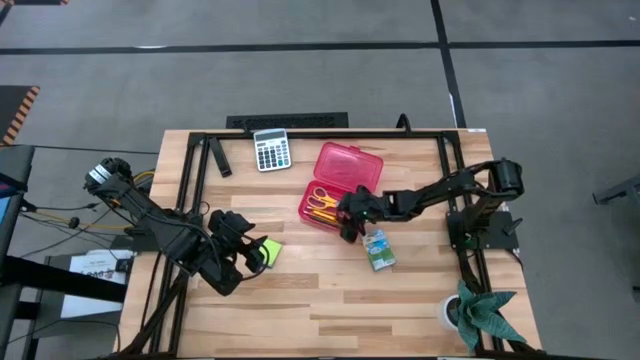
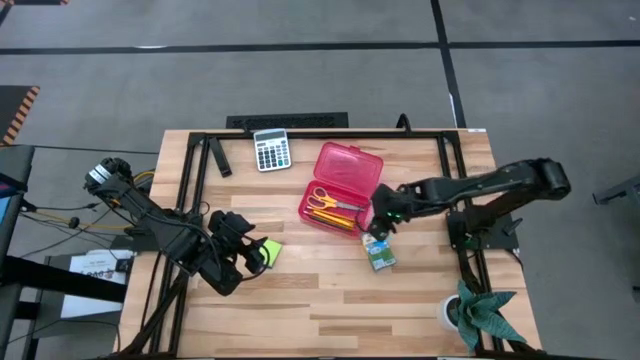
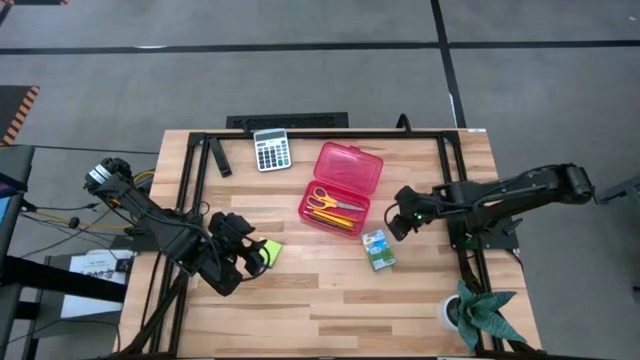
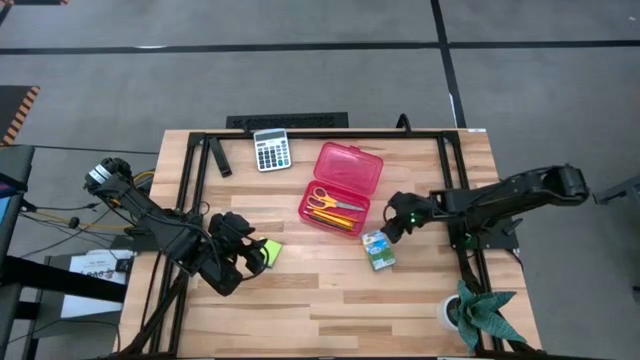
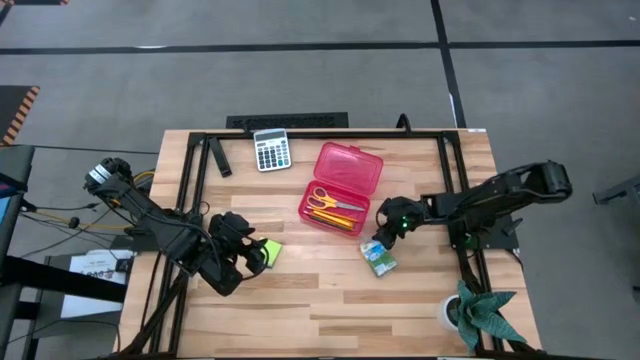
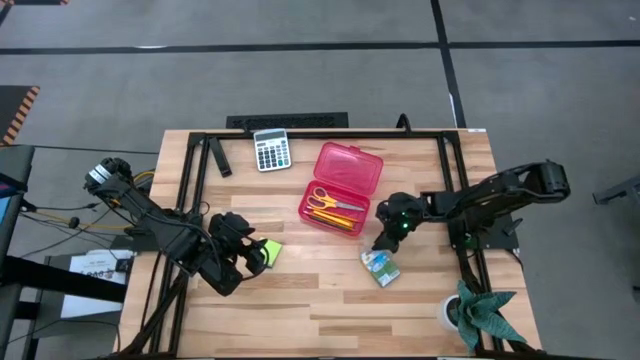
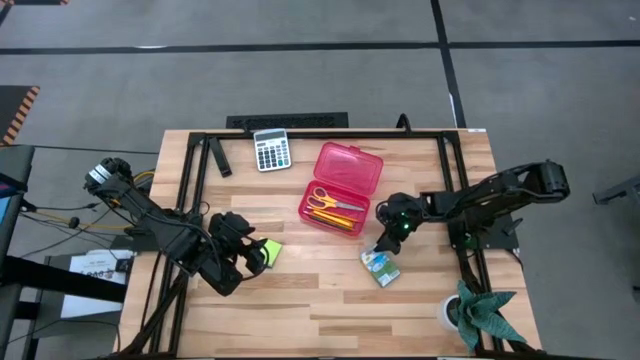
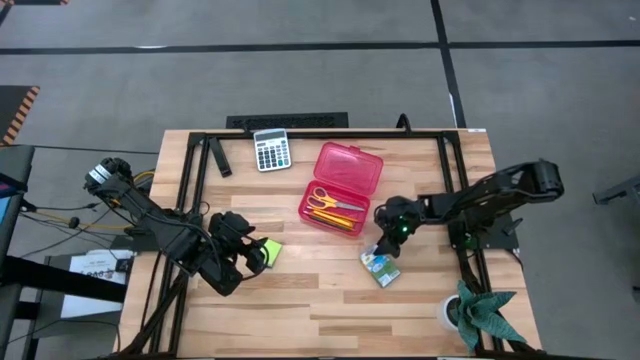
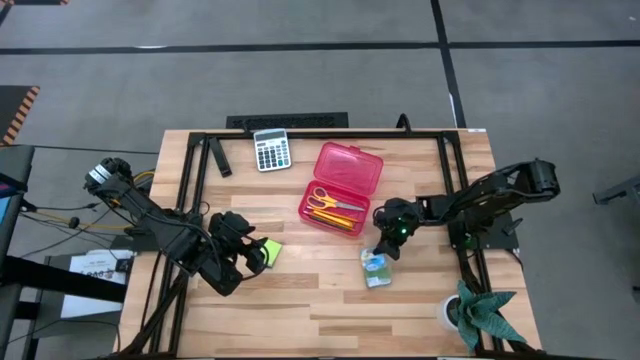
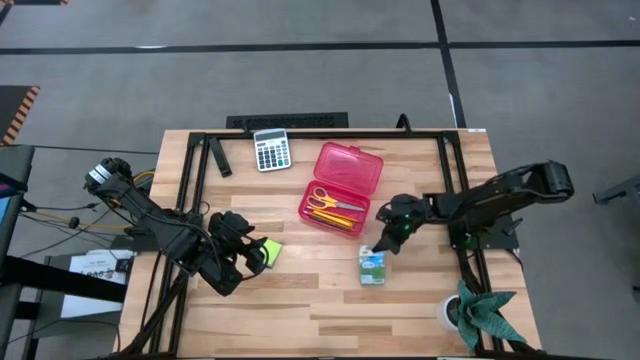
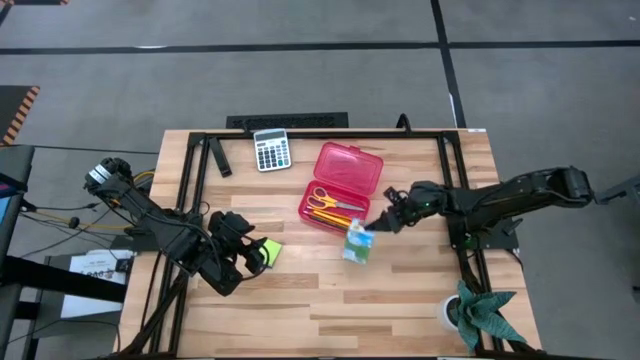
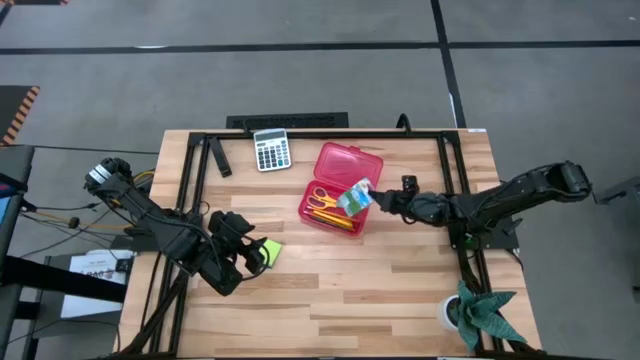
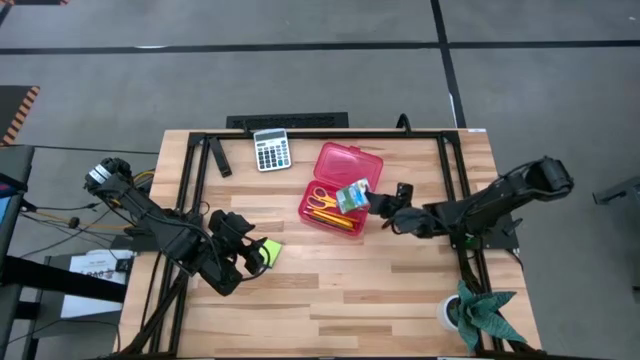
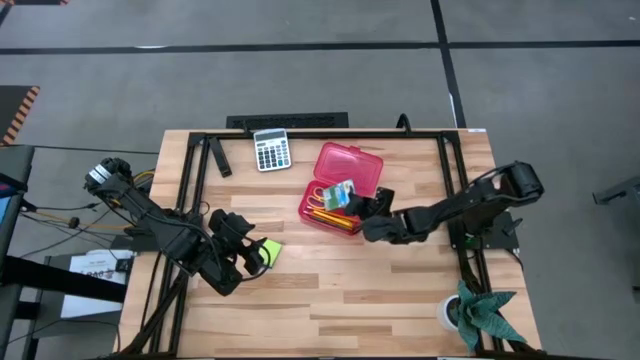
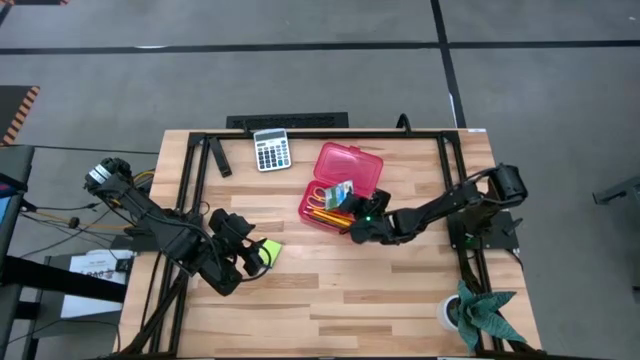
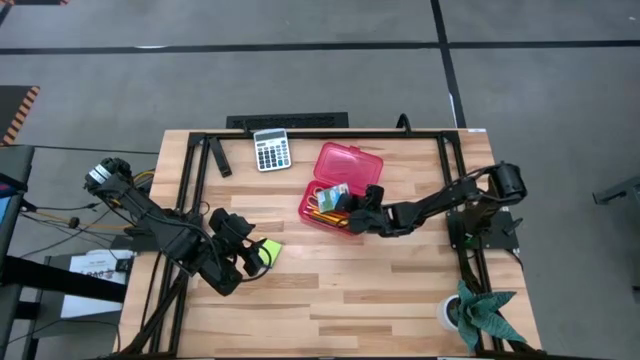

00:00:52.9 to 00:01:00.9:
Task: Pack school essentials
Put the crayon box into the supply box

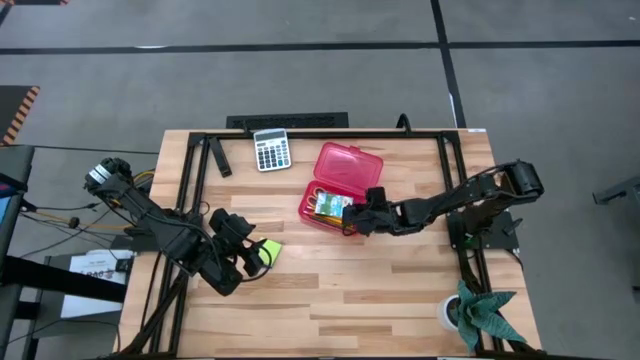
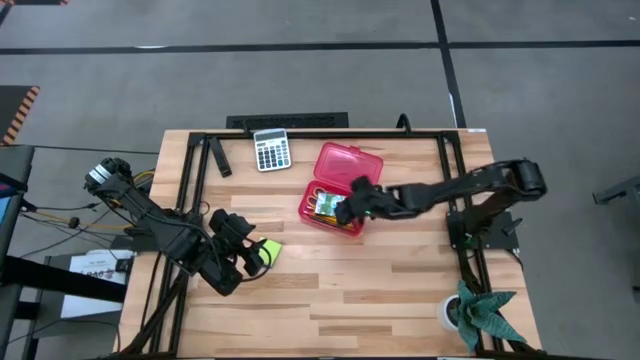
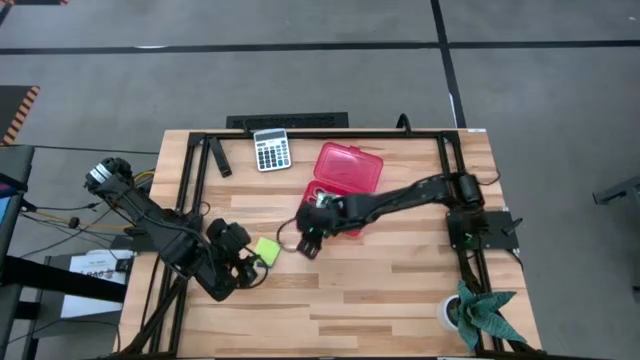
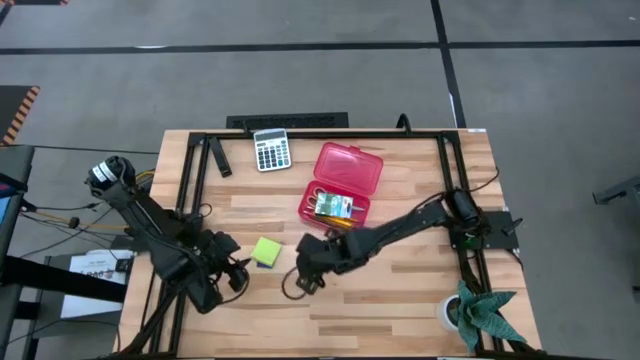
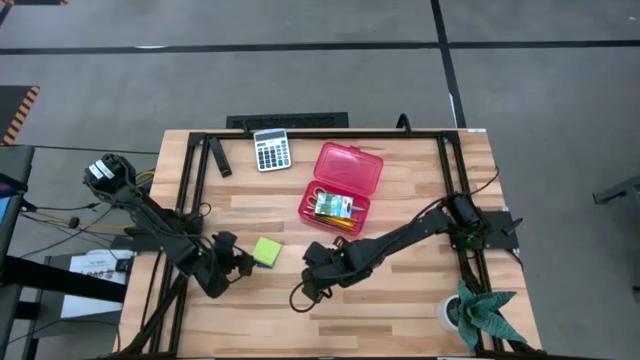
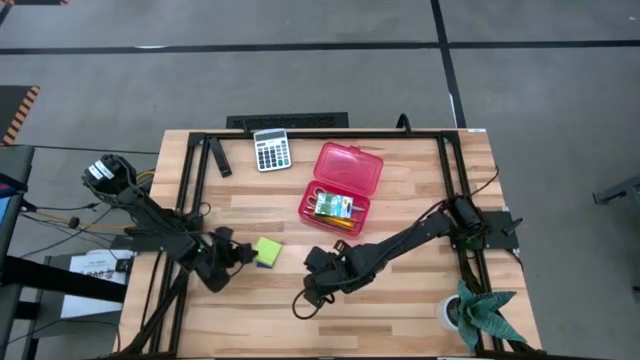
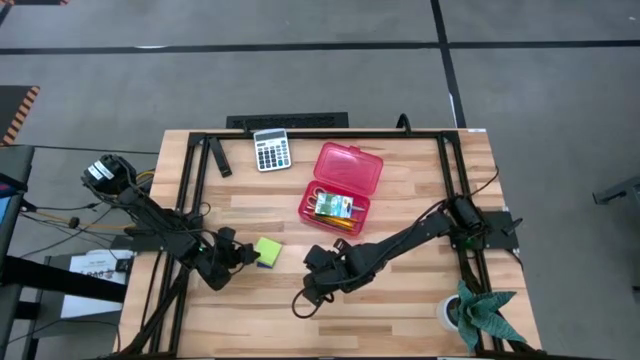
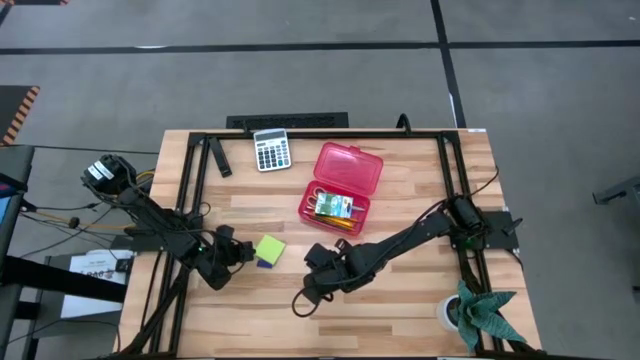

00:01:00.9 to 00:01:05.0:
Put the sticky note into the supply box

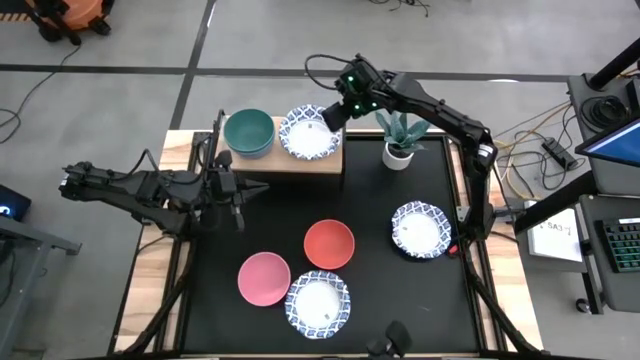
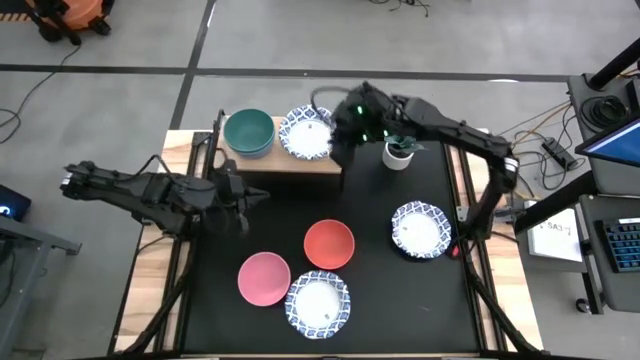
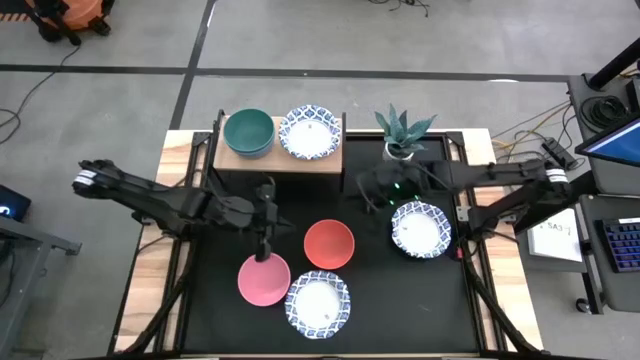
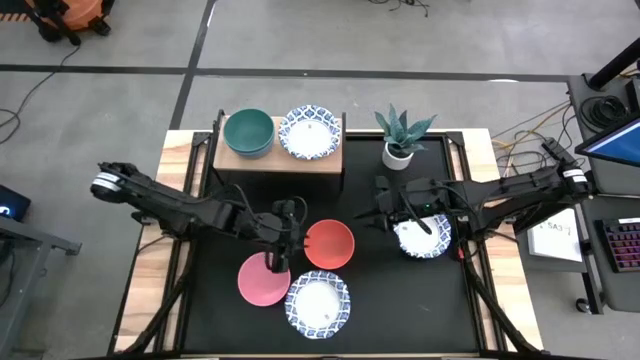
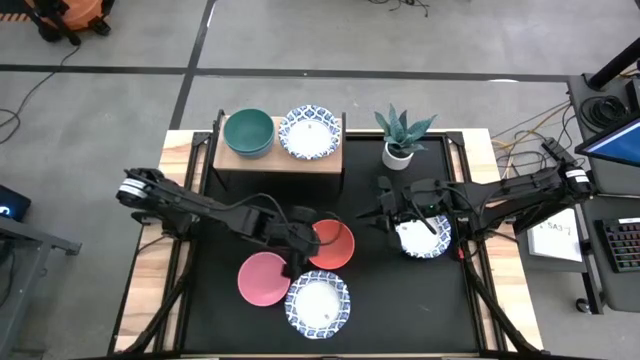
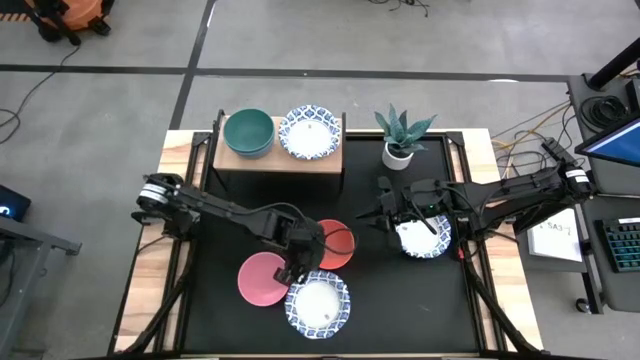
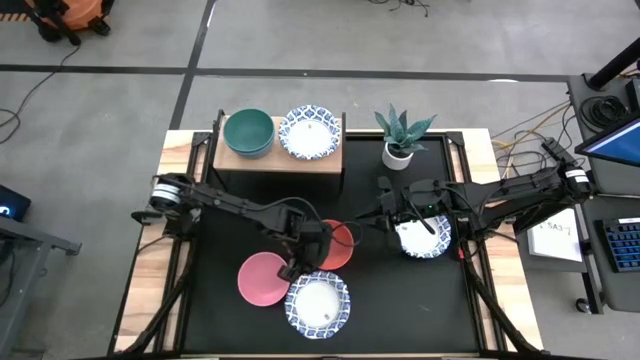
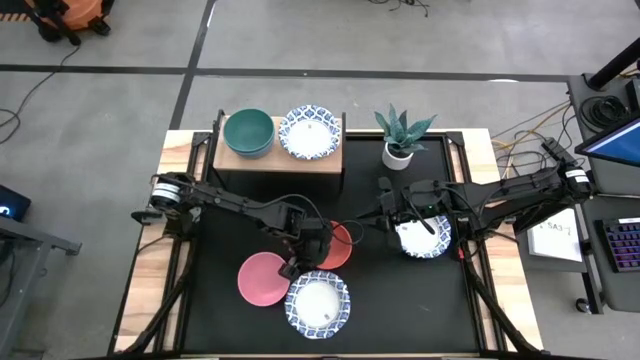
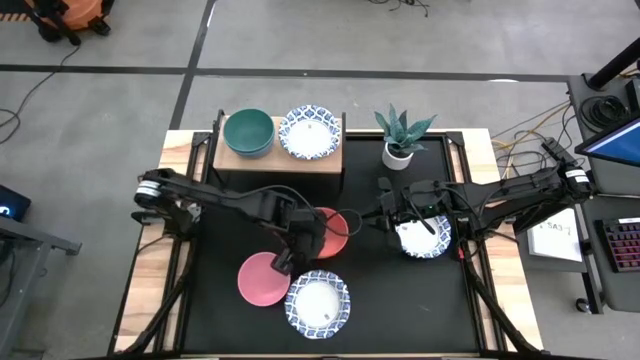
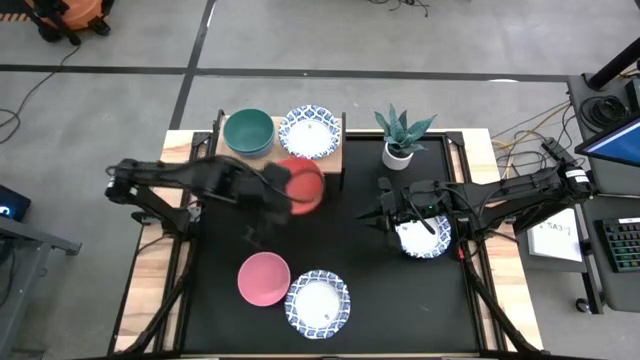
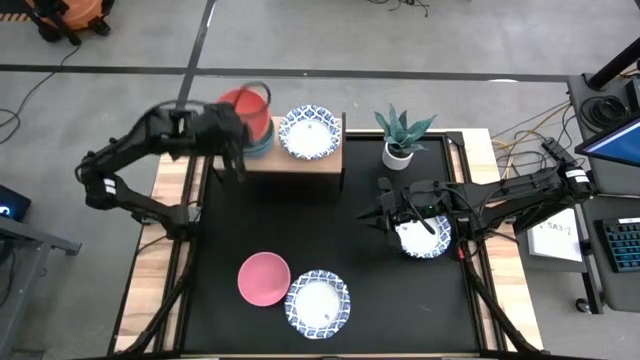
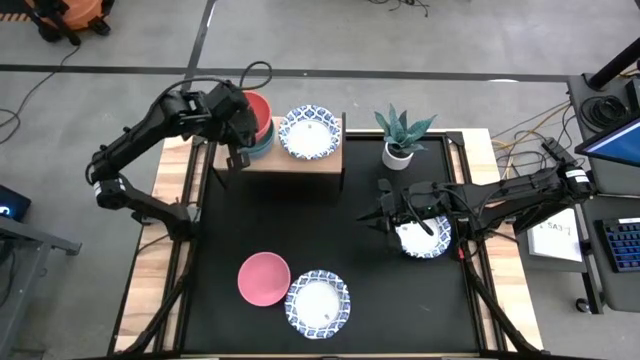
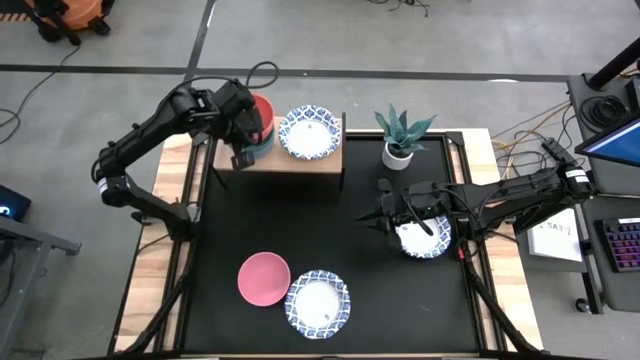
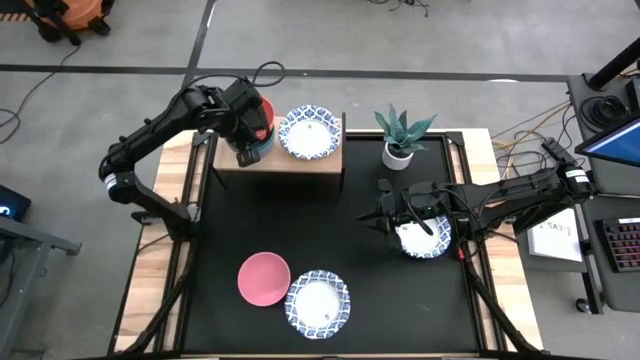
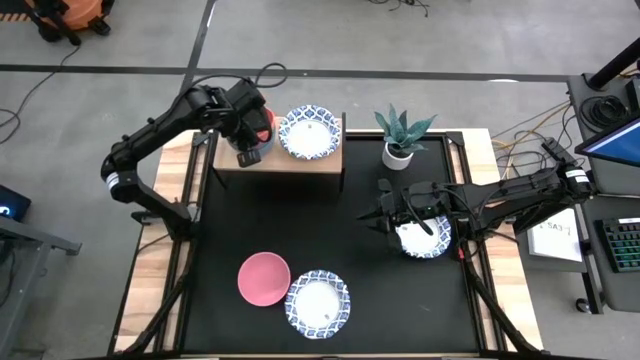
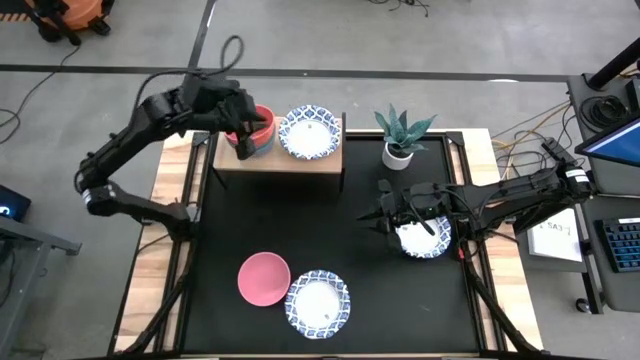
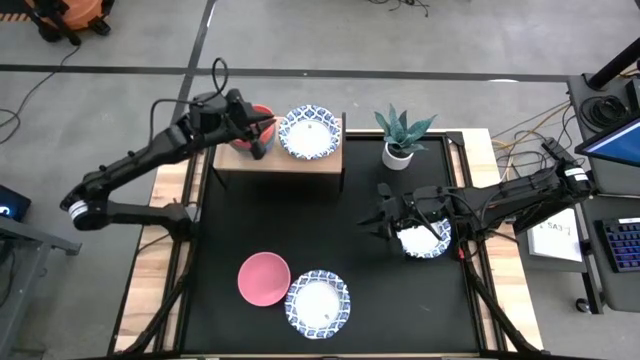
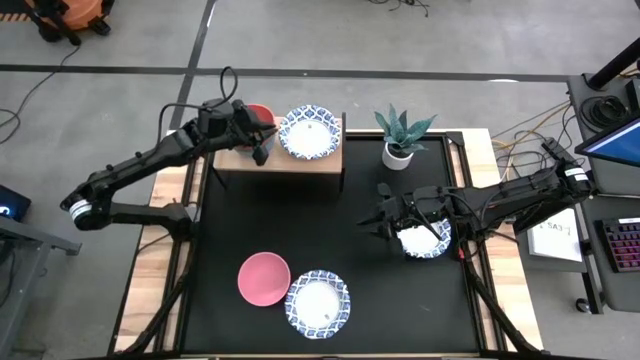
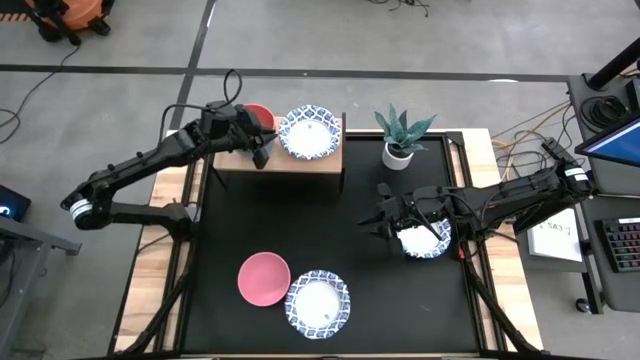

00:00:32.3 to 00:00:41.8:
Task: Place and stack bowls onto a shelf
Stack the orange bowl on top of the green bowl on the shelf
